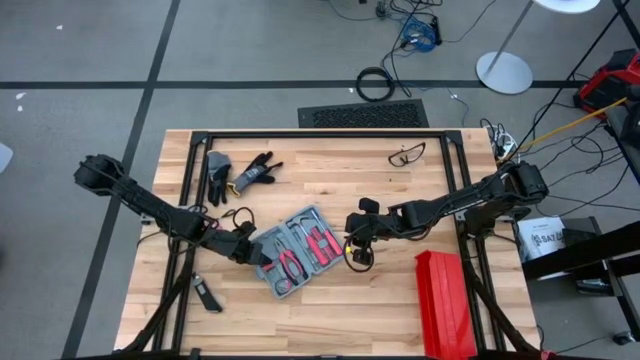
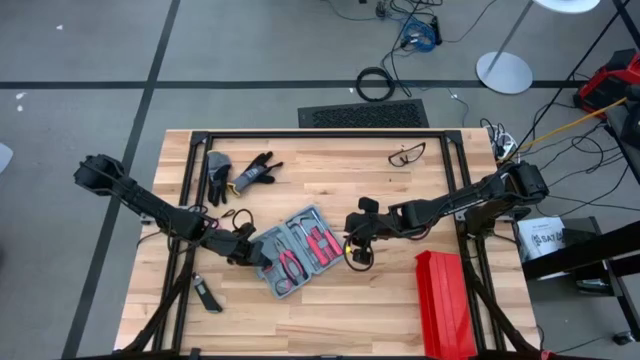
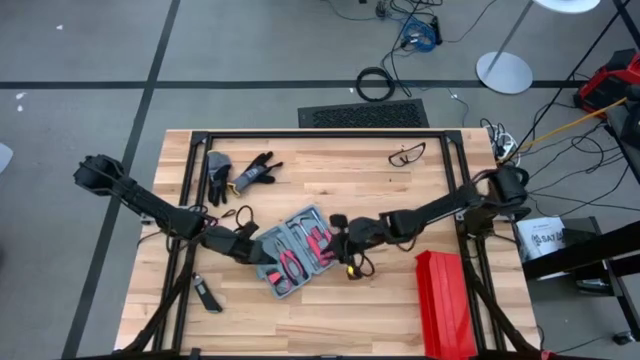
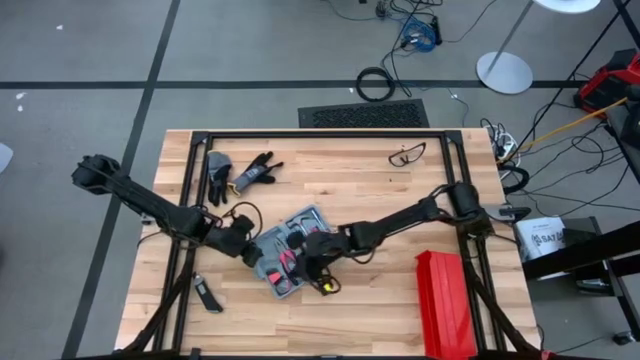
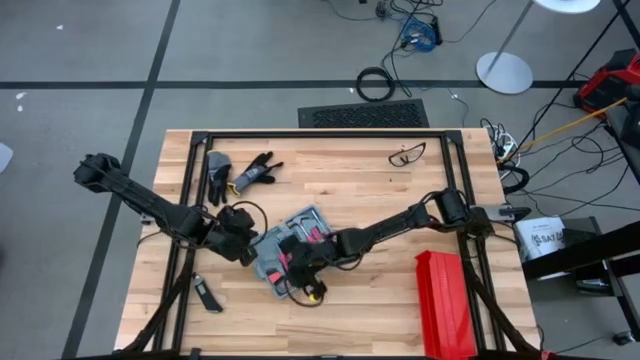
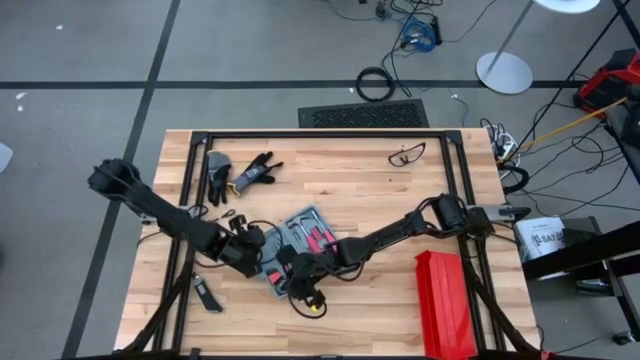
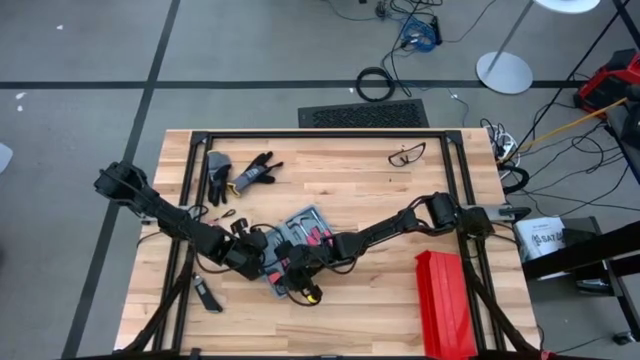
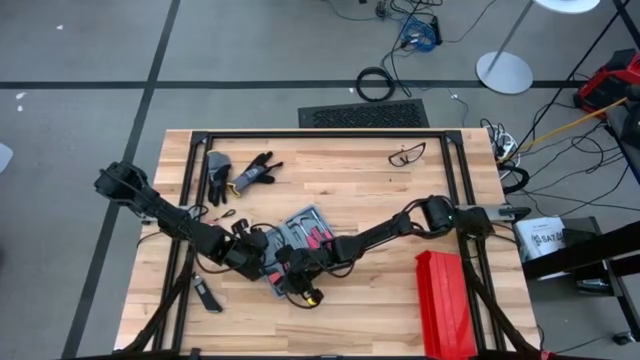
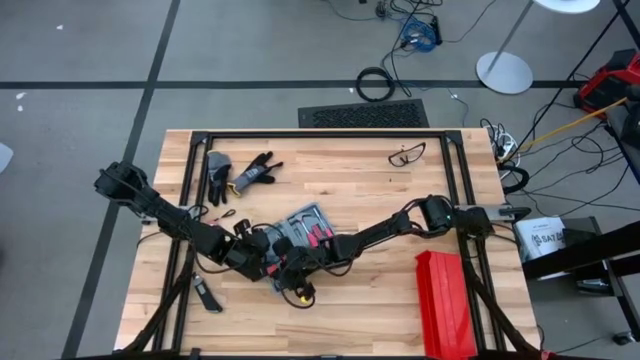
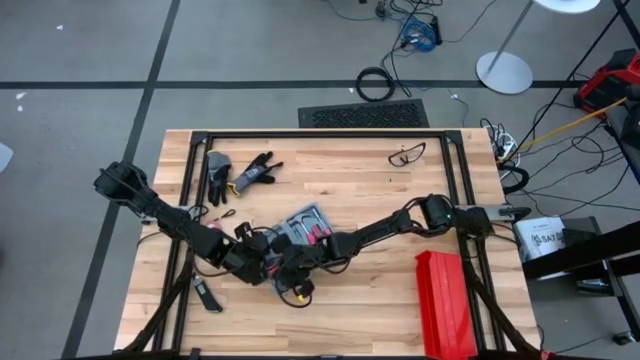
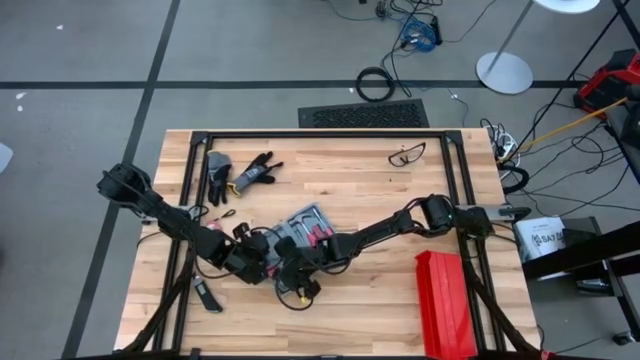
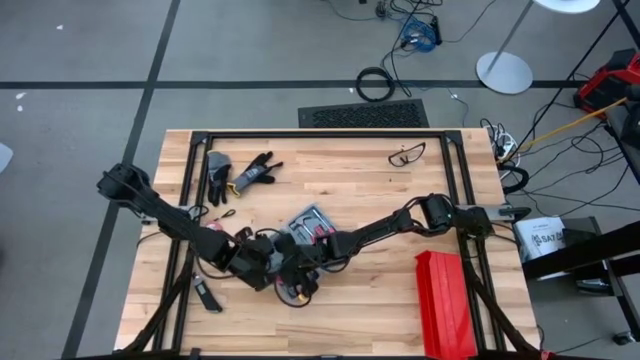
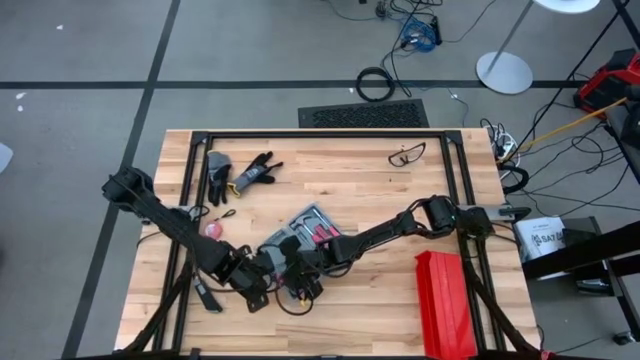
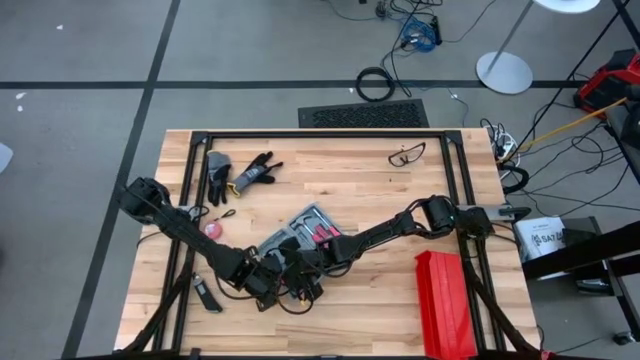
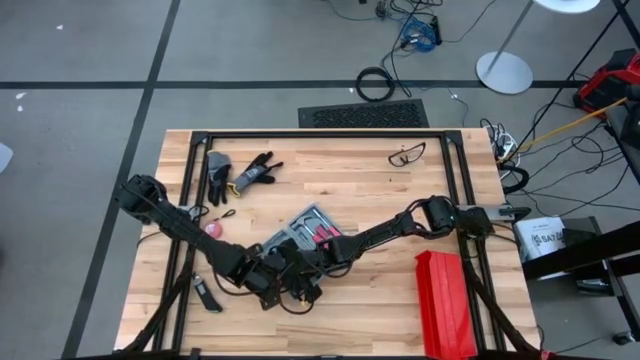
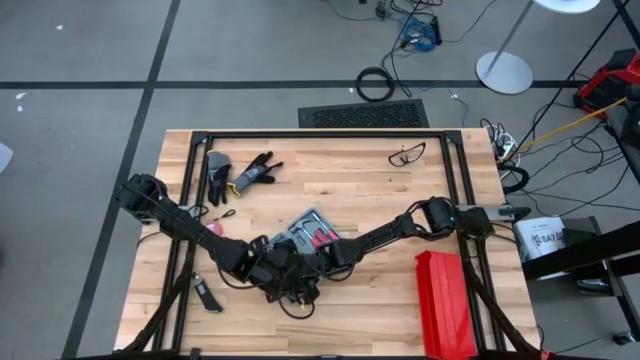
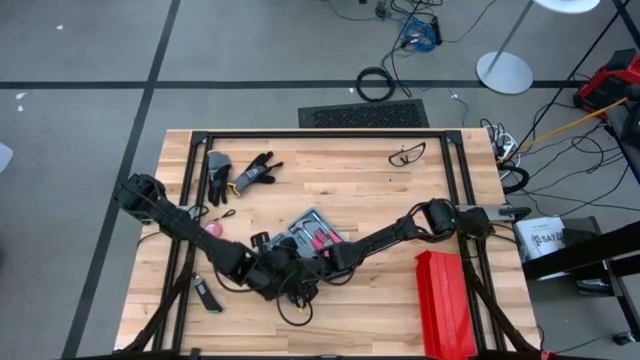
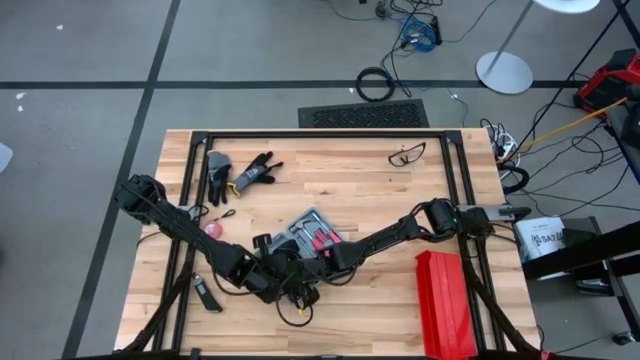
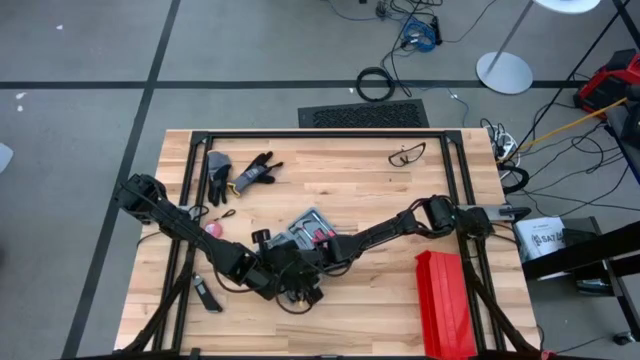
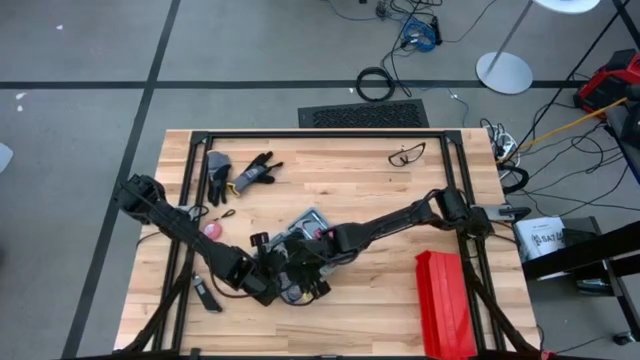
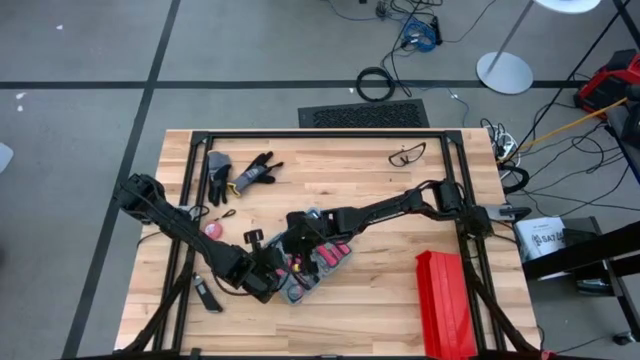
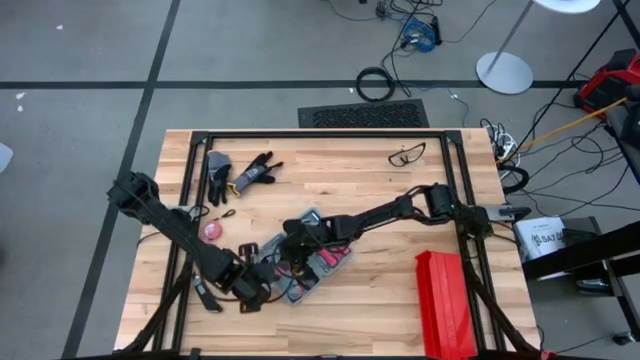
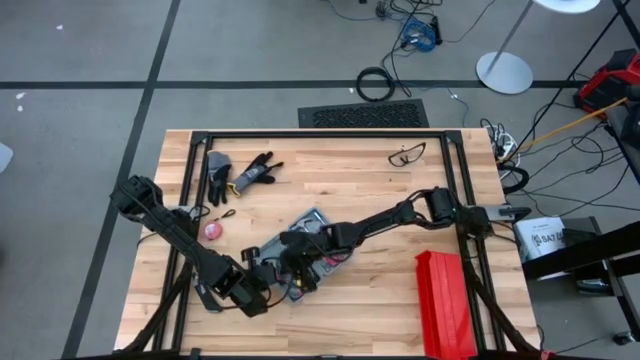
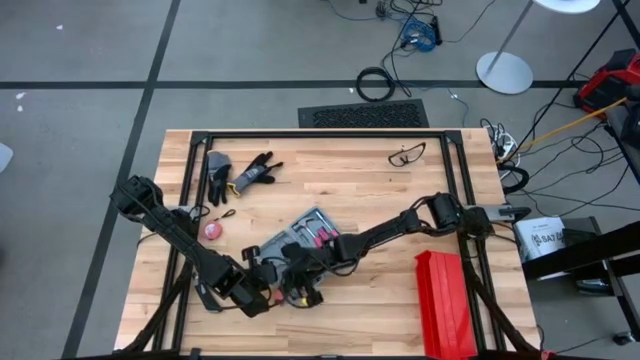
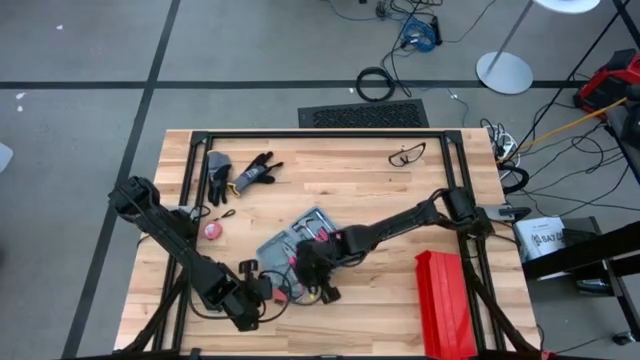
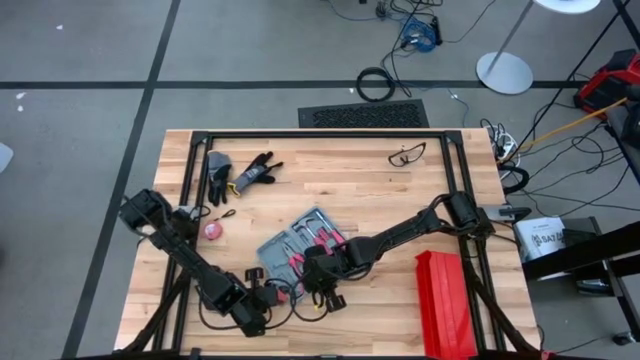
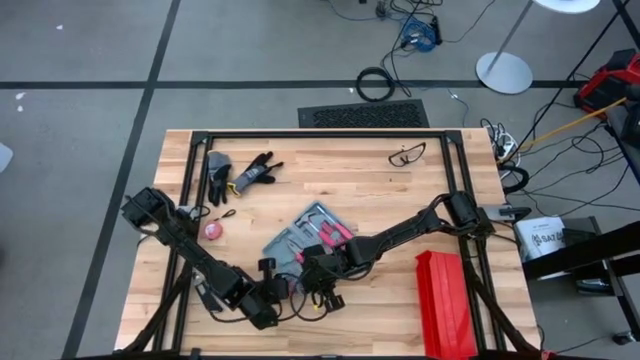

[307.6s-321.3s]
Task: prefit tool cases
Put the red allen wrench into the gray prefit tools case

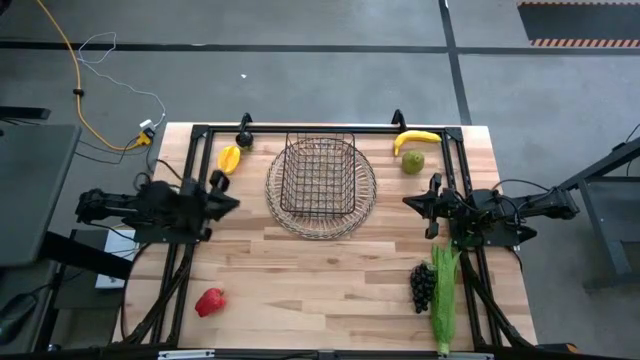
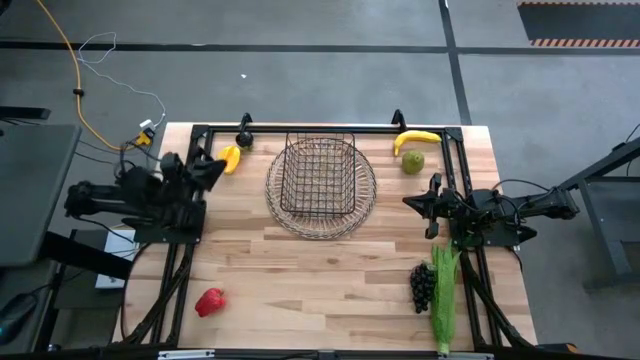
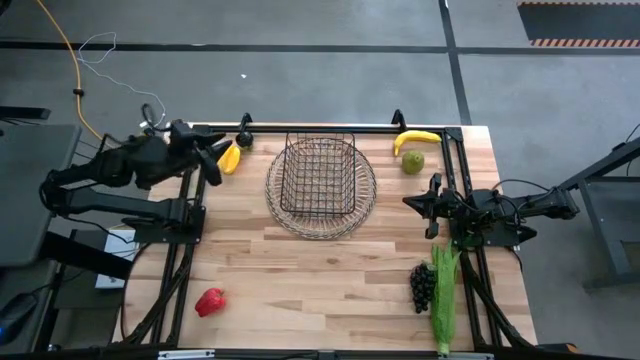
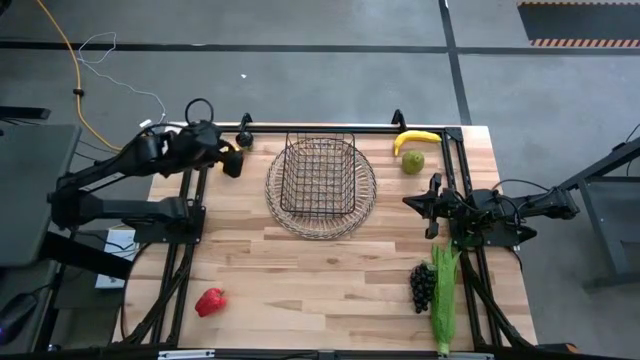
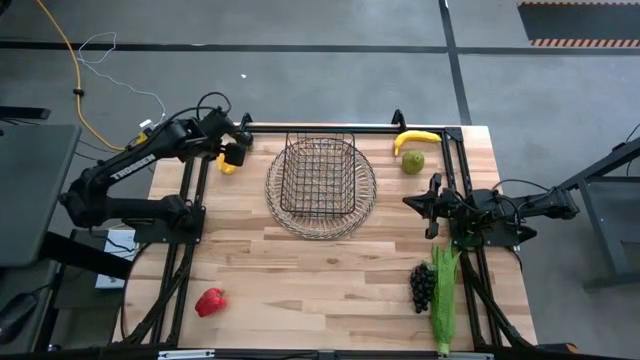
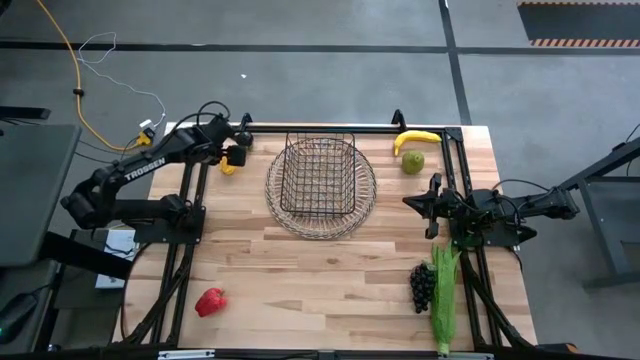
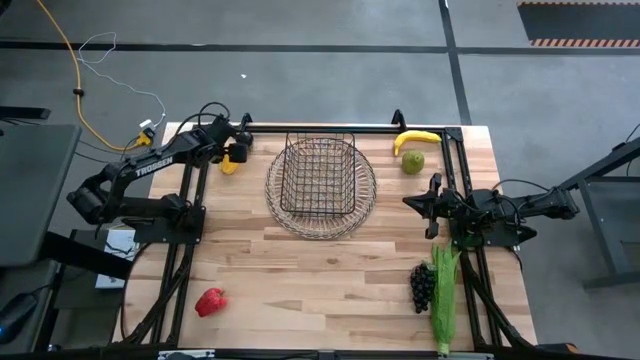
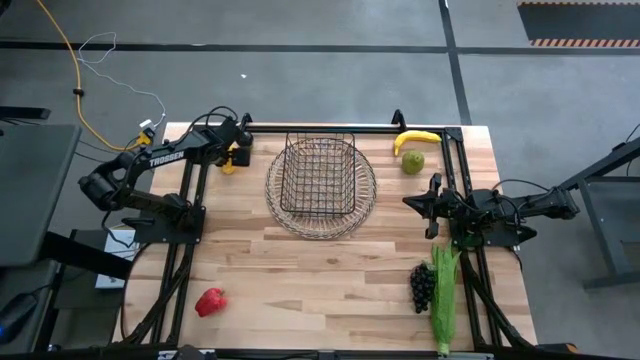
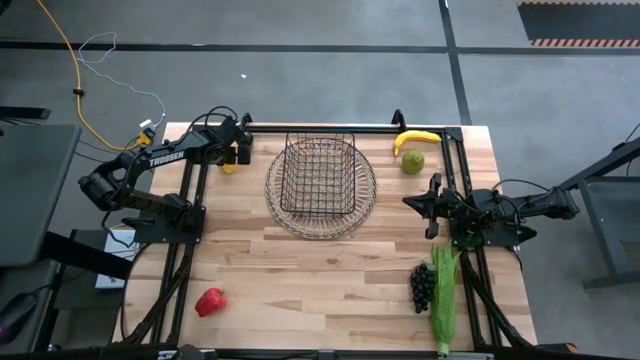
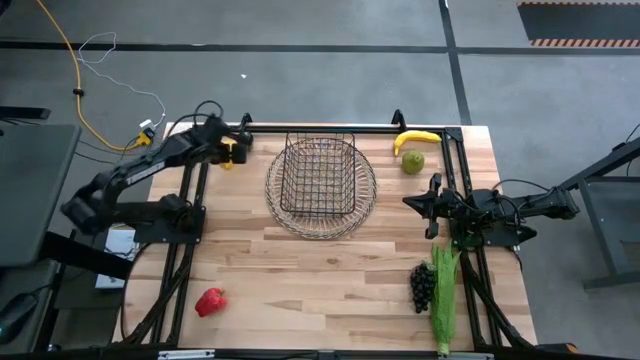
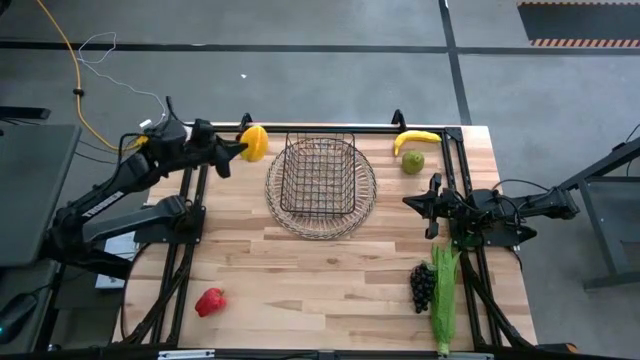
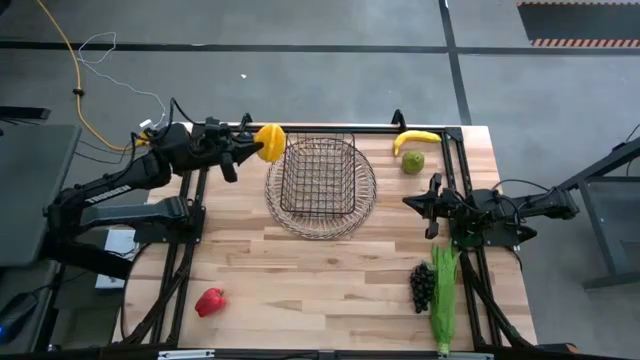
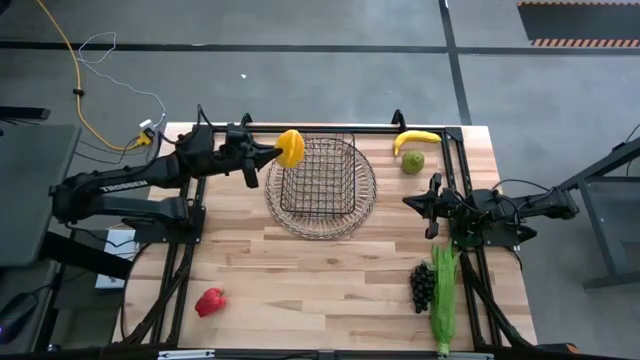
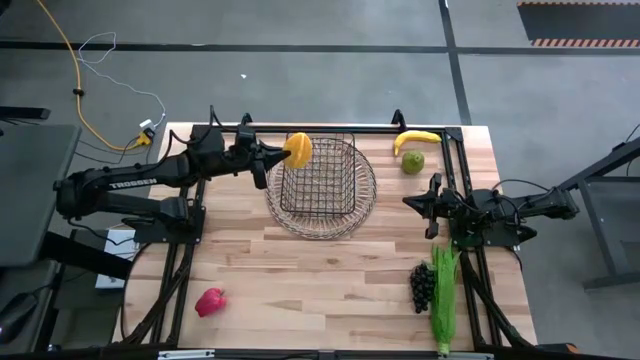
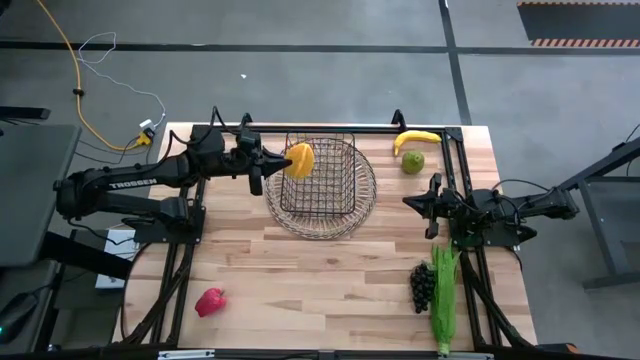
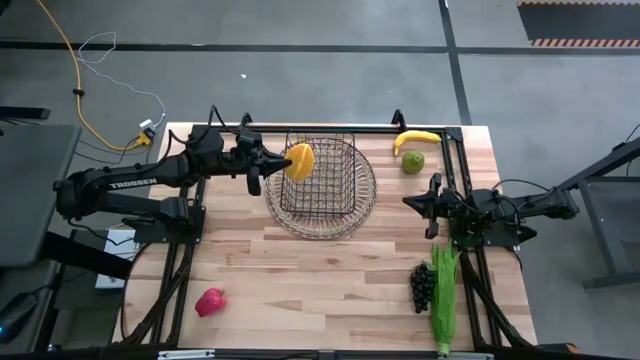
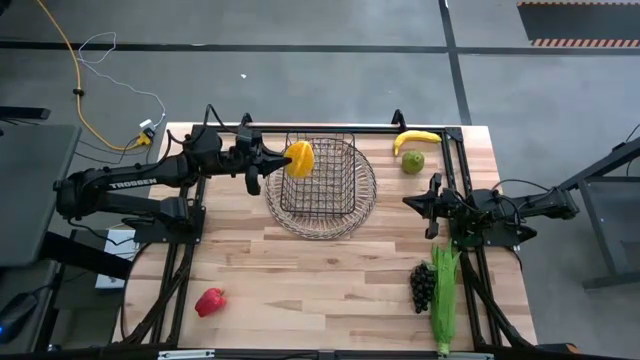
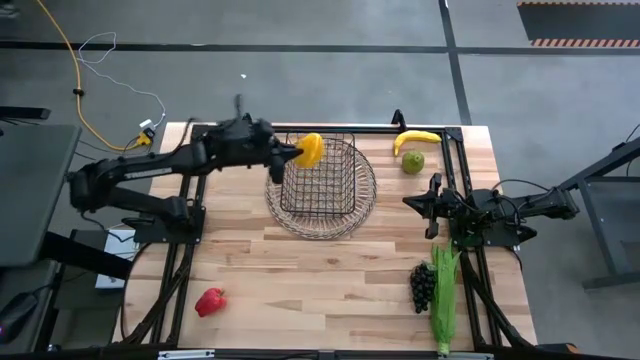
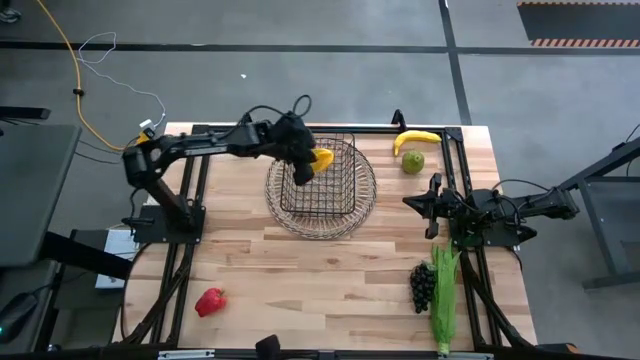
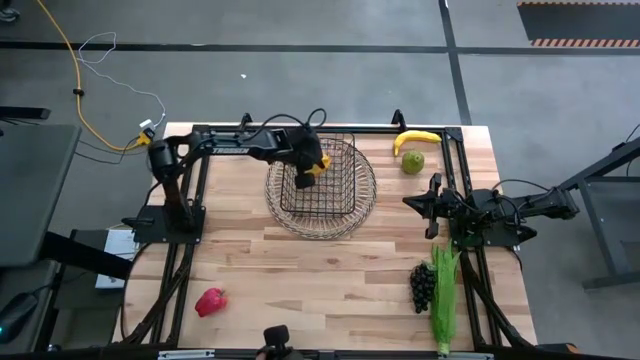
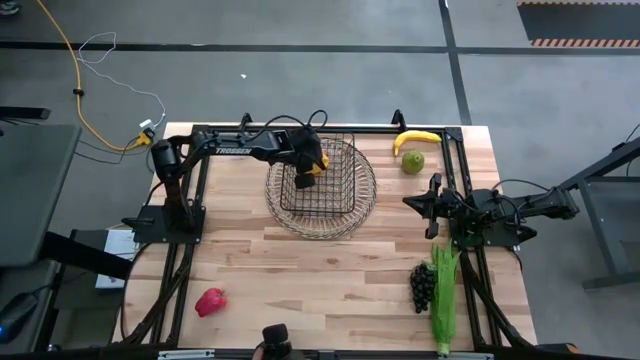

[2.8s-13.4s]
Task: Build produce basket
Put the starfruit into the wire basket
